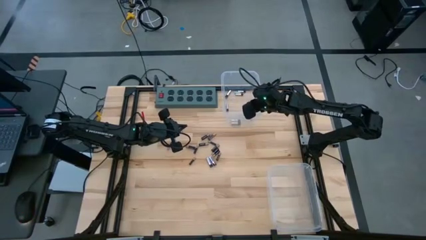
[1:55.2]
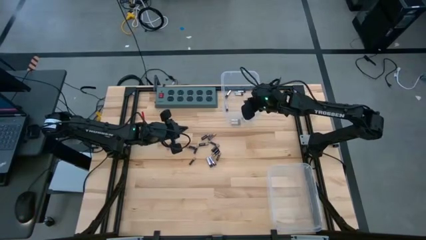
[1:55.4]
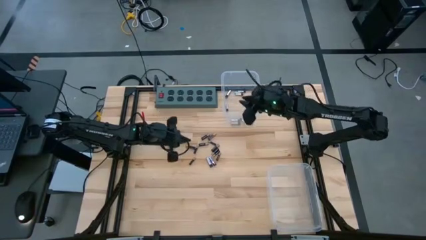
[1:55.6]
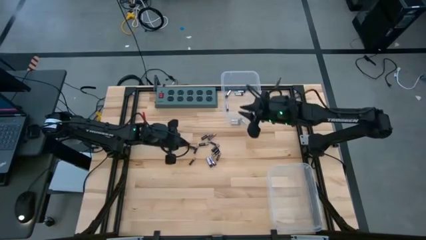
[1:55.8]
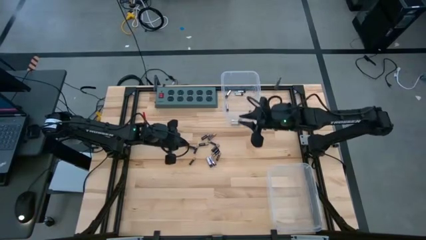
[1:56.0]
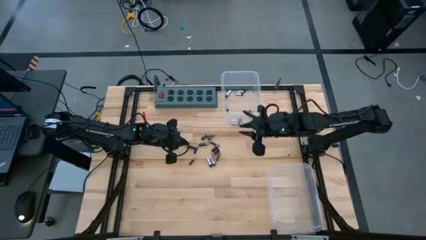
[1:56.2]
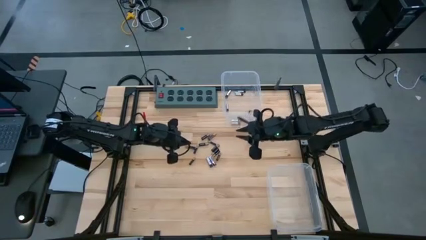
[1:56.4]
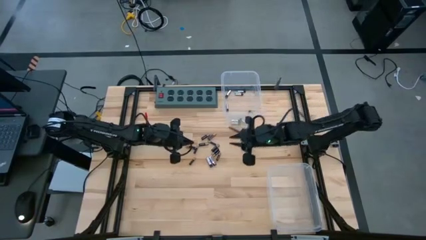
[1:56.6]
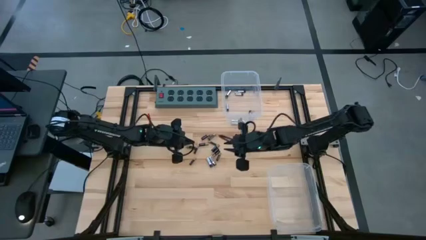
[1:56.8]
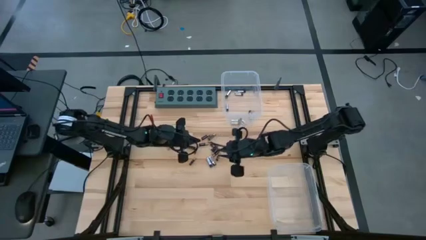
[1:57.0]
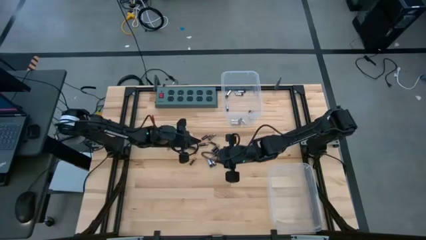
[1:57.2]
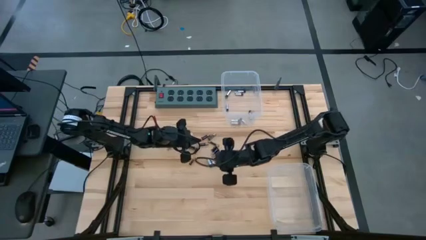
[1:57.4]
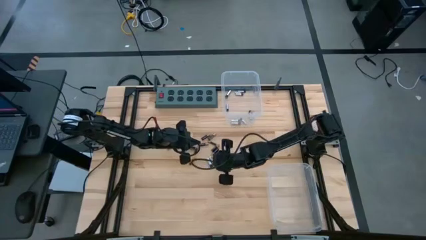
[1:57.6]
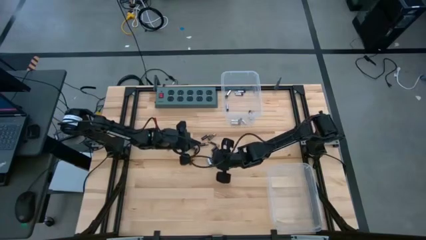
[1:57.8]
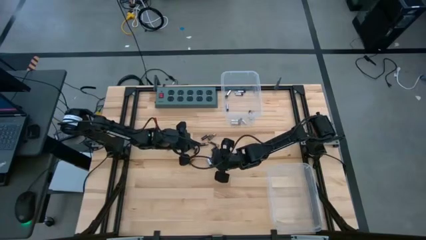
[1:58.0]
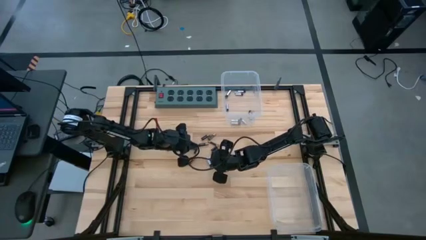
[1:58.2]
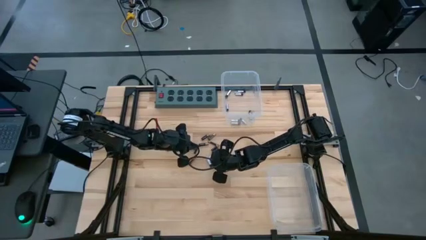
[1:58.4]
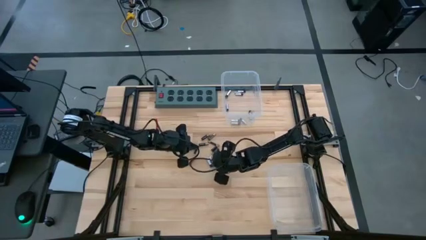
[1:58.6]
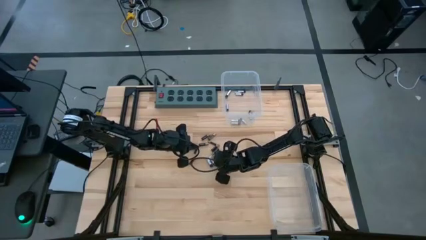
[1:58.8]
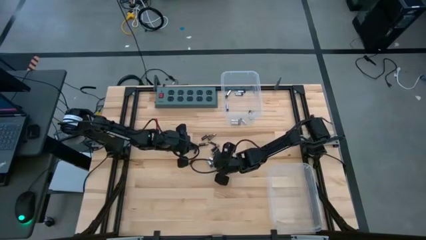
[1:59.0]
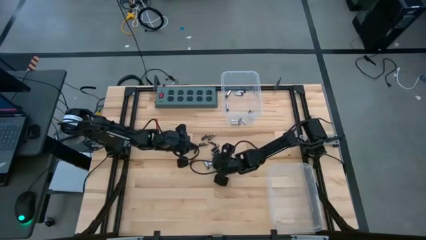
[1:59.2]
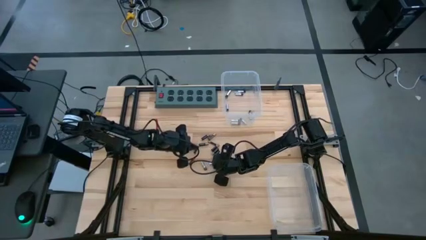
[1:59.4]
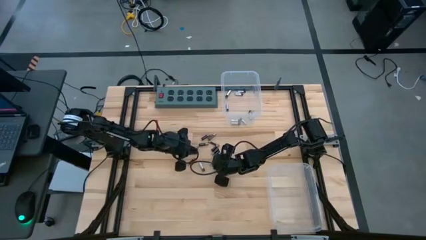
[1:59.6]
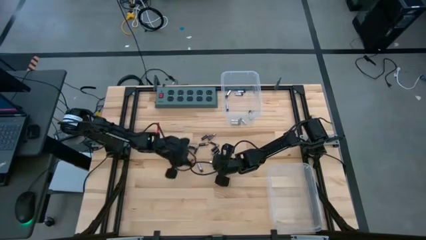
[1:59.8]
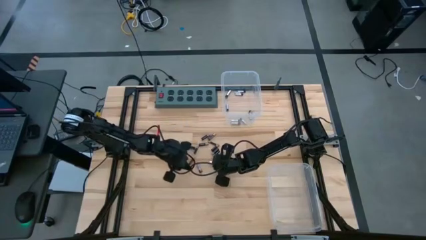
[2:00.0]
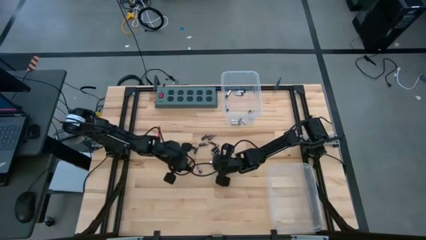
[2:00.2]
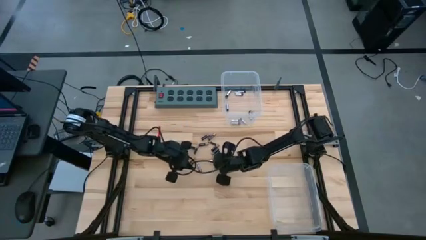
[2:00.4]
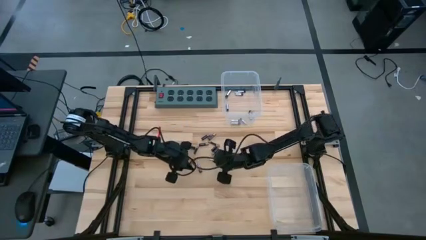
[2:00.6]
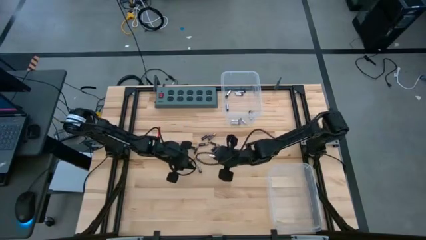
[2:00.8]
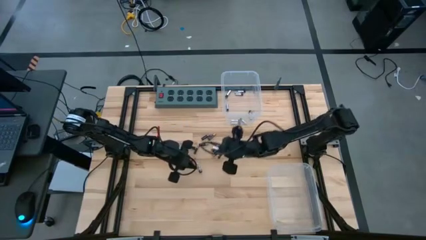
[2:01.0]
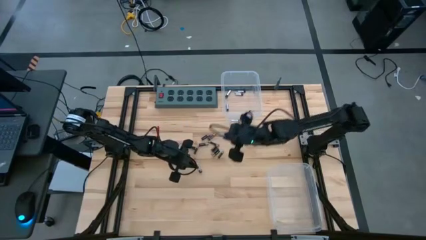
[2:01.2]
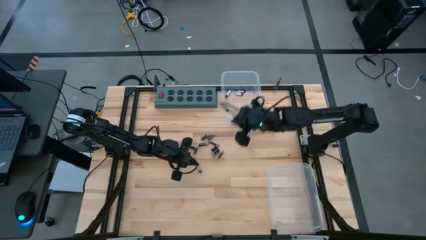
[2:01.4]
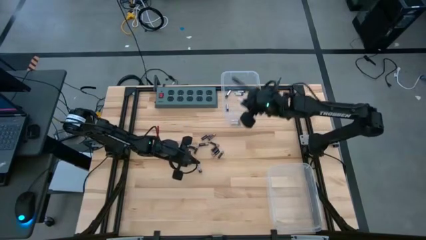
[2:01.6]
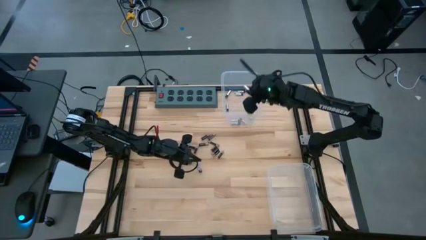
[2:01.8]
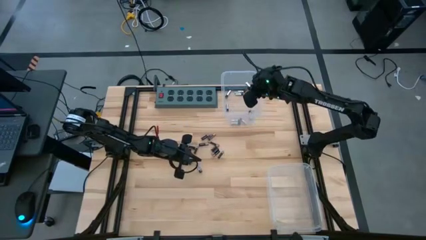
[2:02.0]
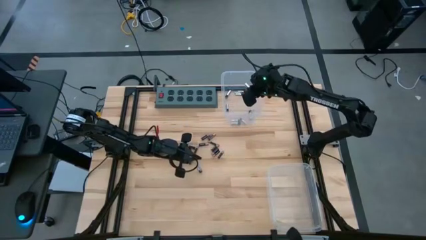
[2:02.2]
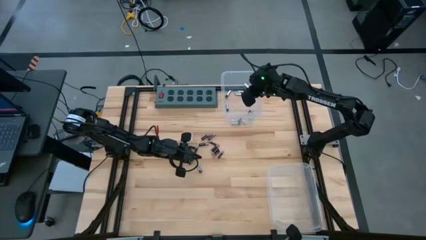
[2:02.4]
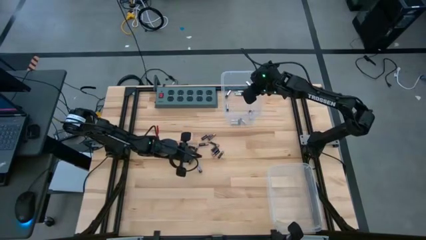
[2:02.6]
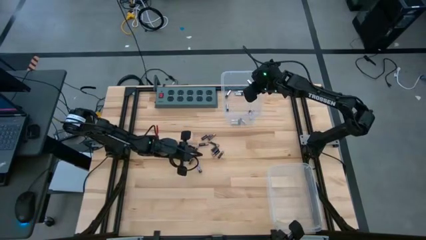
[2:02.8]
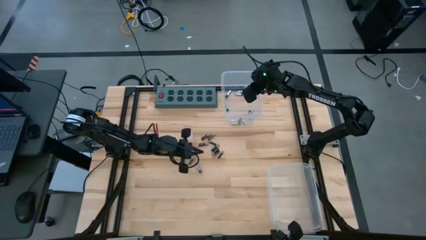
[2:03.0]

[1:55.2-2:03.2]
Task: Sort batteries
Put the silver battery into the top transparent bin

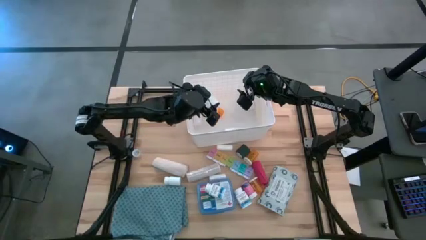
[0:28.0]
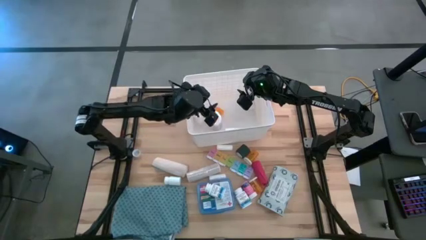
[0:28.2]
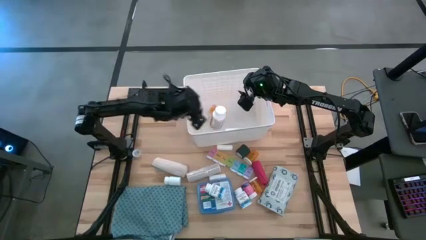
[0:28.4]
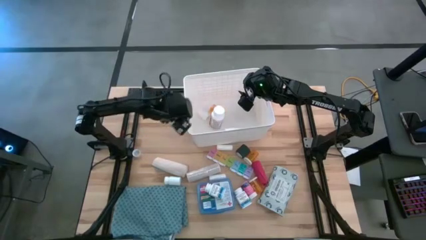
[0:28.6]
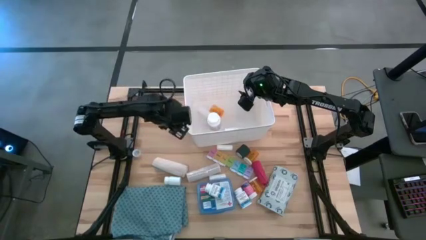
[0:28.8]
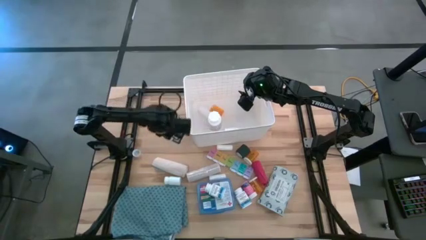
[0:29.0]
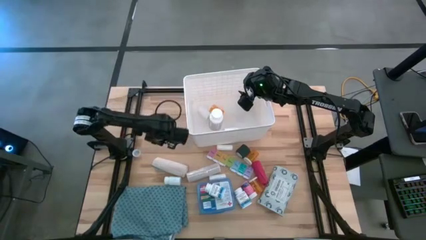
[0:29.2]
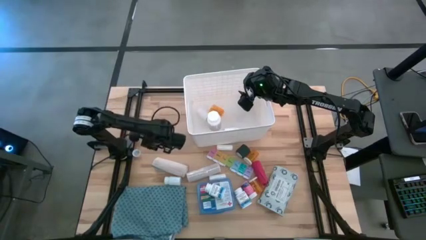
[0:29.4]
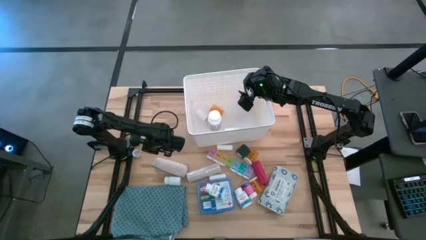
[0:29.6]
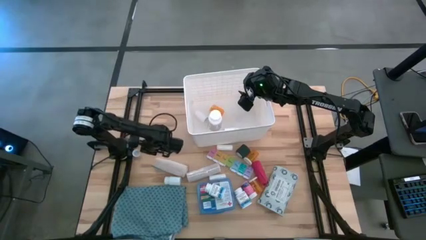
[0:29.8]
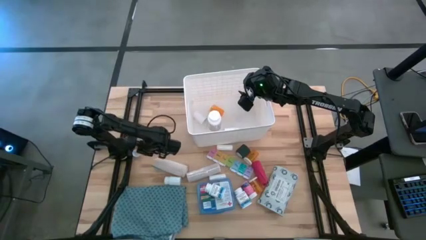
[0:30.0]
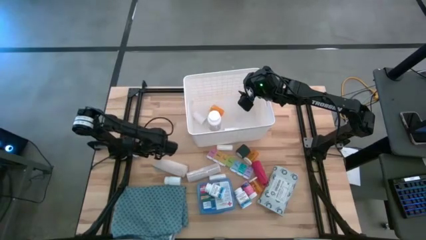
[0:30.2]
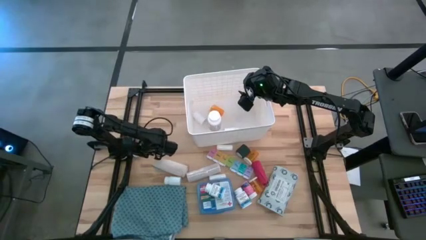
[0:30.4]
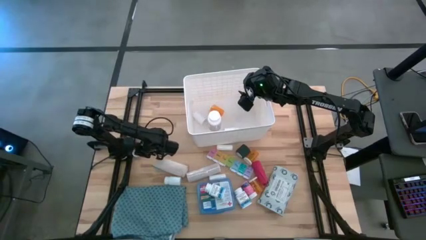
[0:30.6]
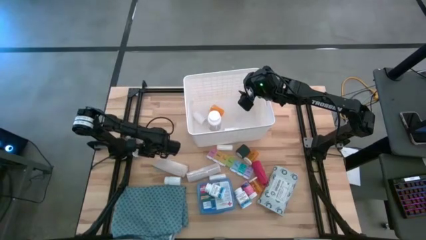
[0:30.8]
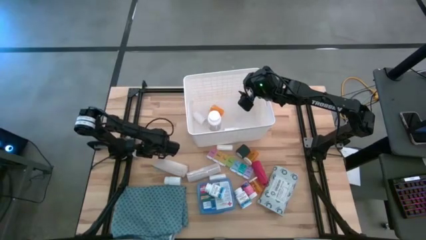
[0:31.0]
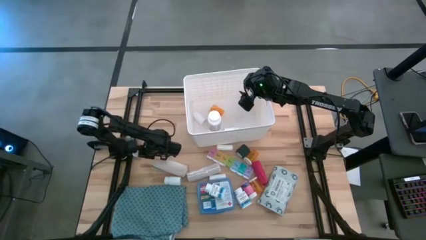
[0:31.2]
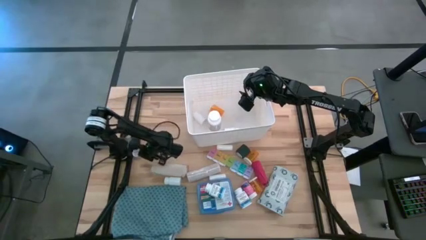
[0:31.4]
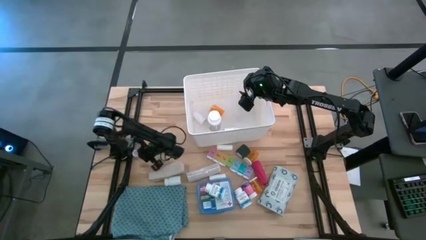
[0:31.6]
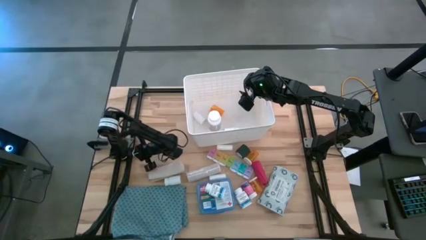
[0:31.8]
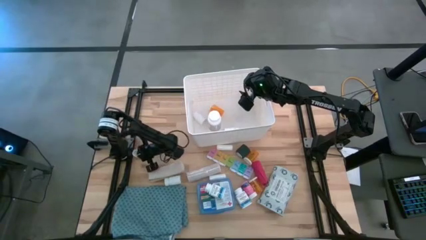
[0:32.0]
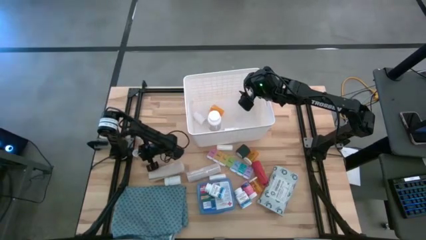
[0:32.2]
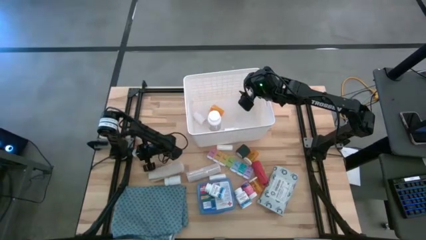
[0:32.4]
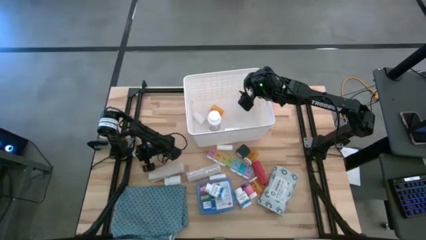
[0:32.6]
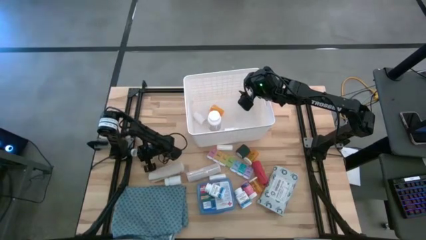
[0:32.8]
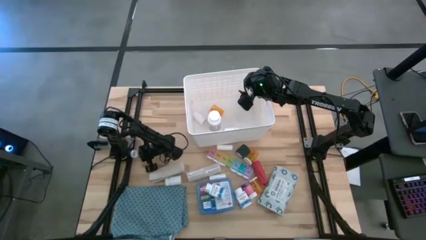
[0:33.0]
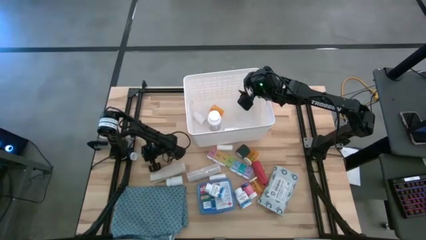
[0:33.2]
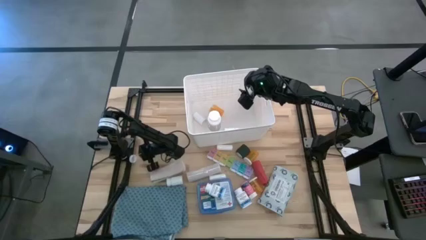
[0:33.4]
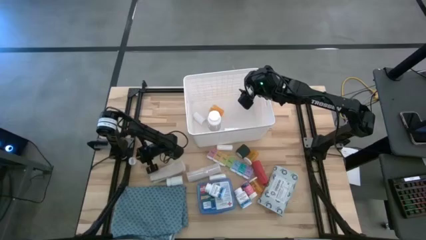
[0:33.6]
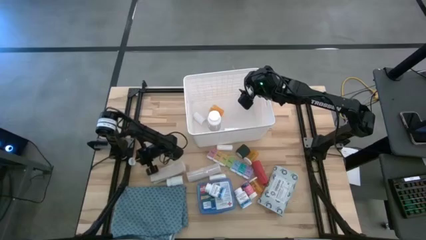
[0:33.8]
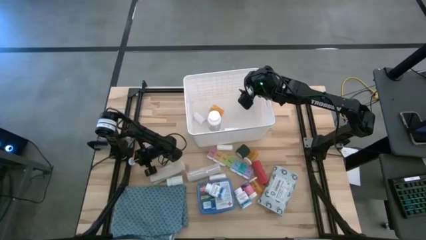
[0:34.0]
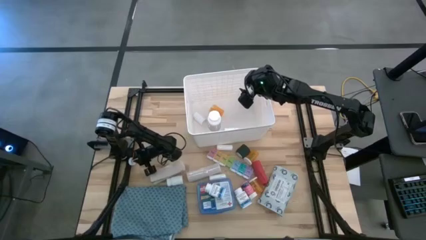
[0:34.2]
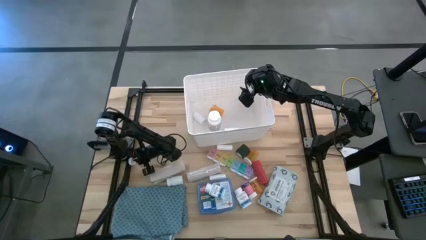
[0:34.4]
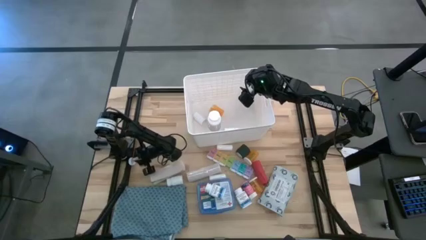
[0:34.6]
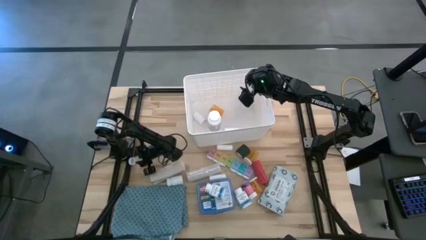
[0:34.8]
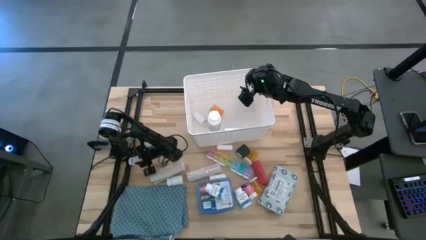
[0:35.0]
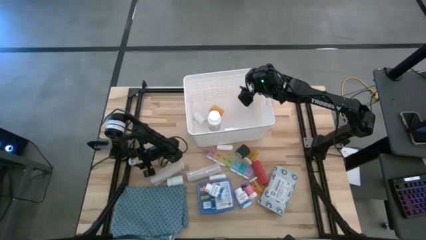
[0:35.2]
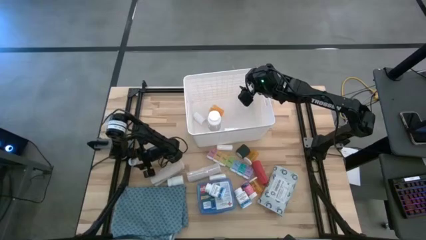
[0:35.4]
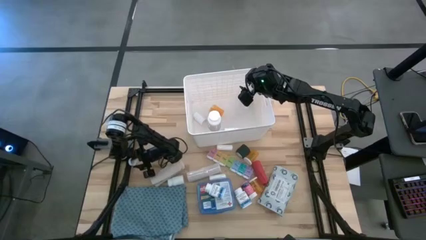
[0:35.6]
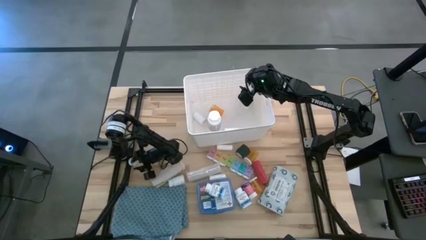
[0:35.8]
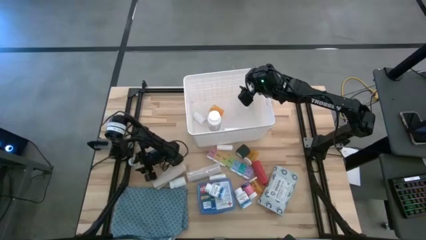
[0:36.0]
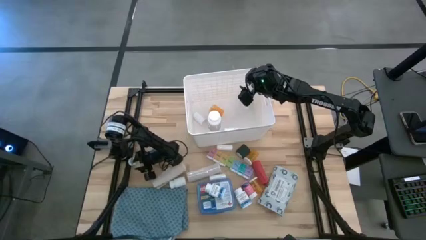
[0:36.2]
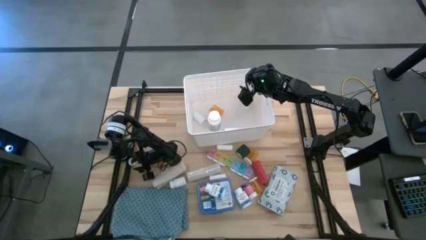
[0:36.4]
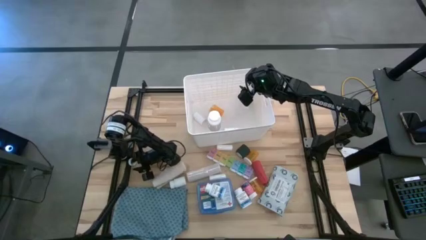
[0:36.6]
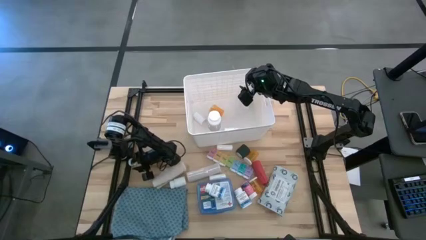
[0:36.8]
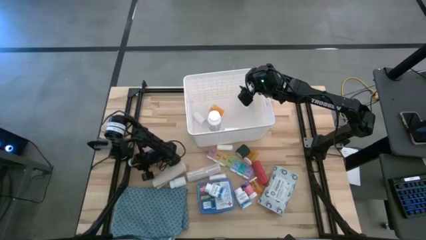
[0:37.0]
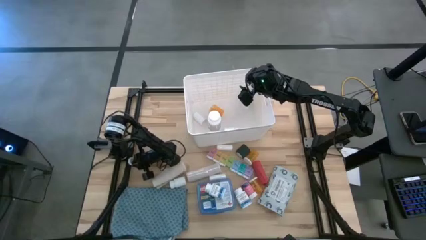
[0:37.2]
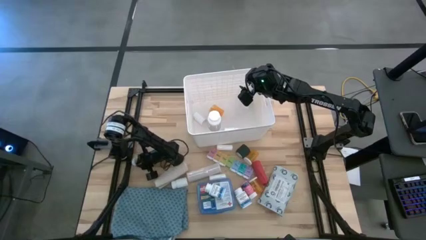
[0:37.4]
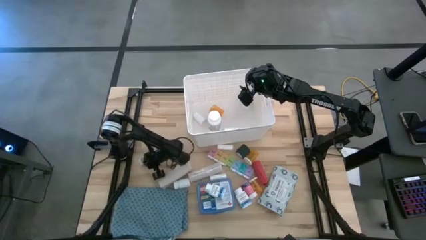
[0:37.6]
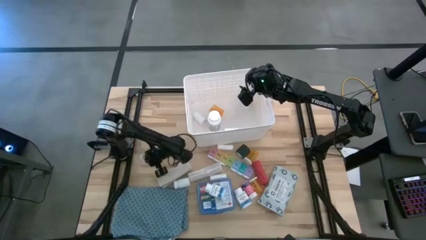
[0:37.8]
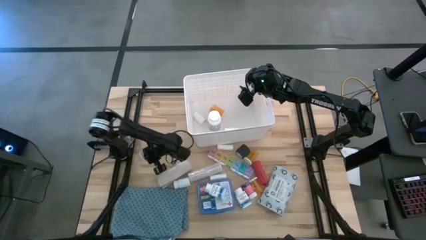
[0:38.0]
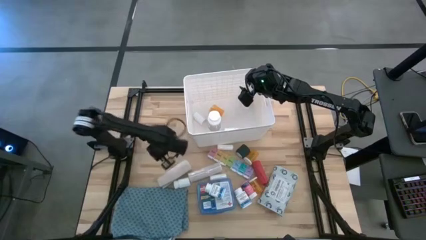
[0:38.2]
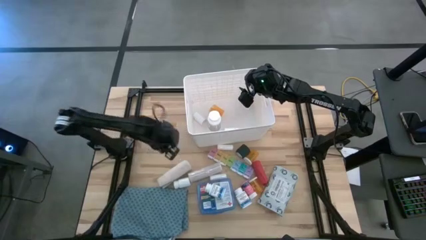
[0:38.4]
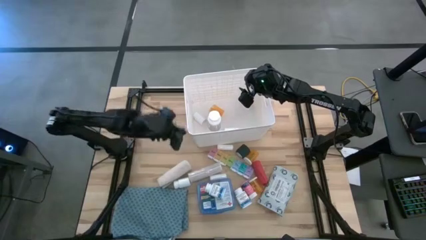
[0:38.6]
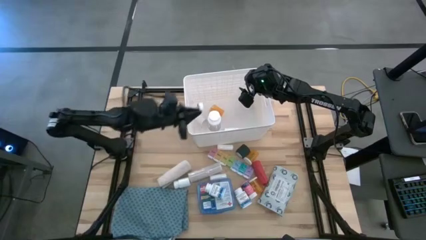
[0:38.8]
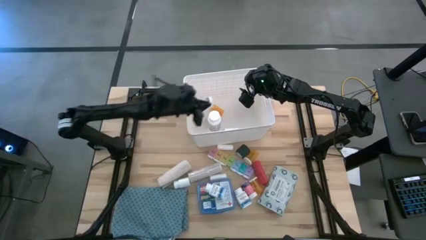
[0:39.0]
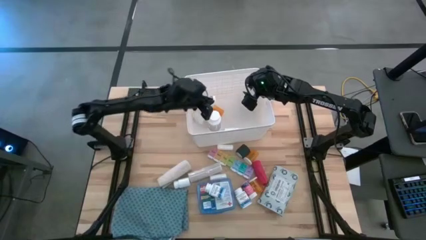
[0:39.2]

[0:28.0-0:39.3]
Task: Pick & place medical supplies in basket/bin
Put the white medicine bottle cap into the bin
